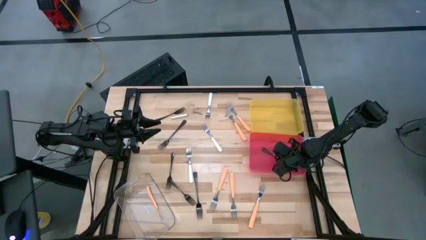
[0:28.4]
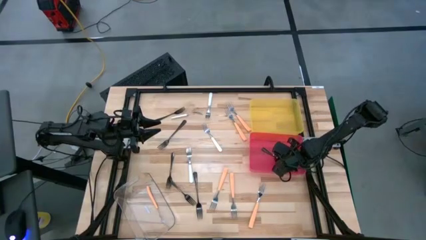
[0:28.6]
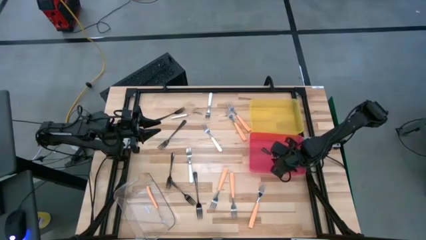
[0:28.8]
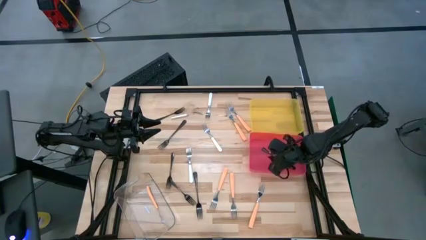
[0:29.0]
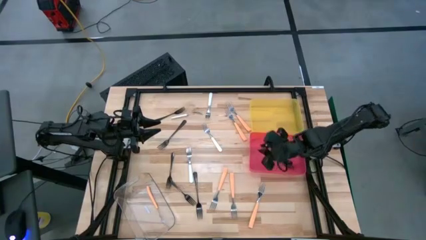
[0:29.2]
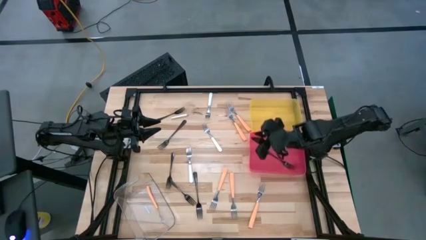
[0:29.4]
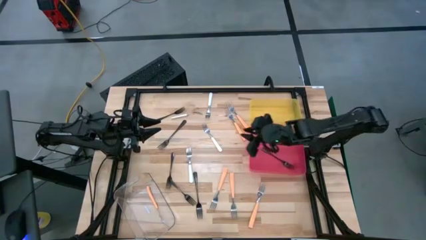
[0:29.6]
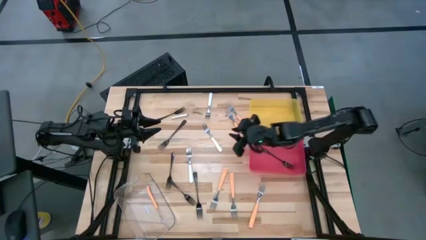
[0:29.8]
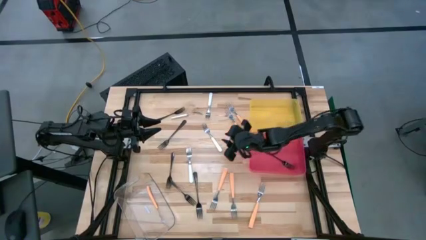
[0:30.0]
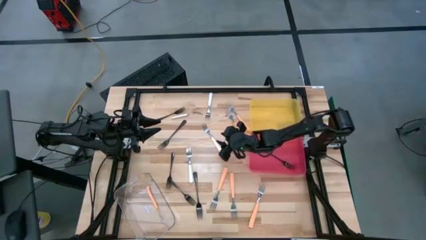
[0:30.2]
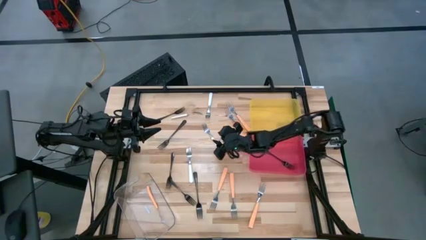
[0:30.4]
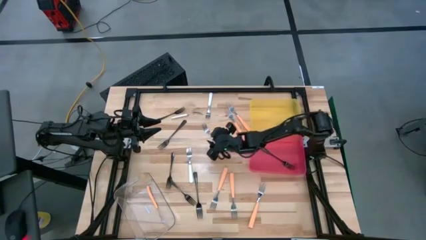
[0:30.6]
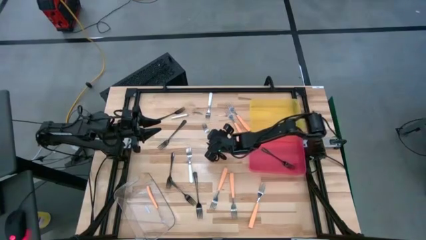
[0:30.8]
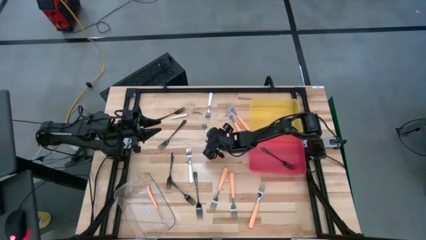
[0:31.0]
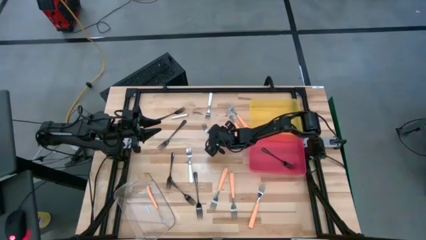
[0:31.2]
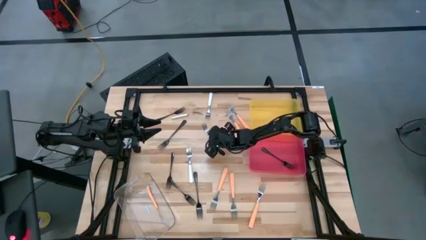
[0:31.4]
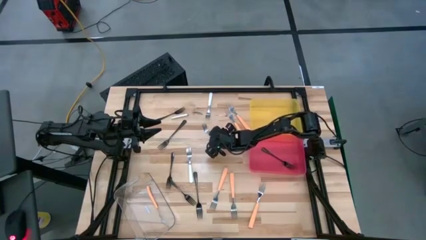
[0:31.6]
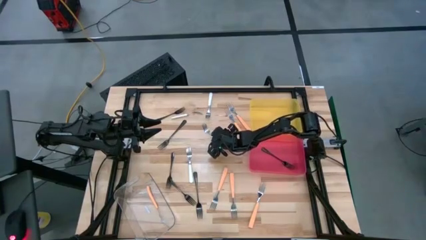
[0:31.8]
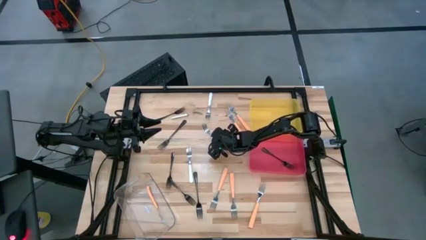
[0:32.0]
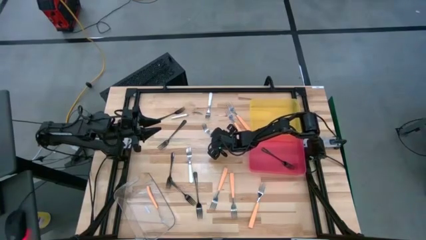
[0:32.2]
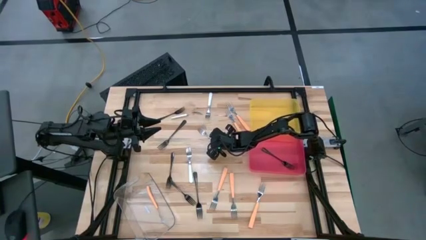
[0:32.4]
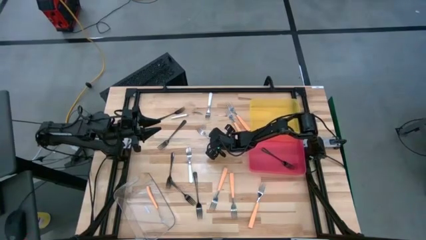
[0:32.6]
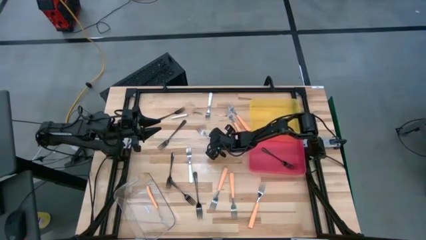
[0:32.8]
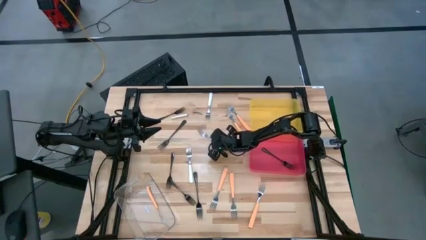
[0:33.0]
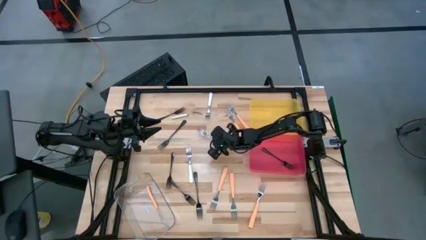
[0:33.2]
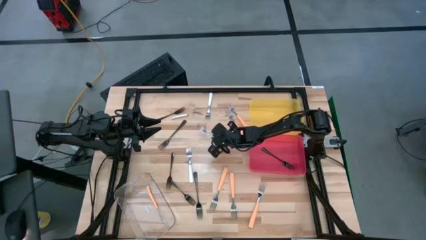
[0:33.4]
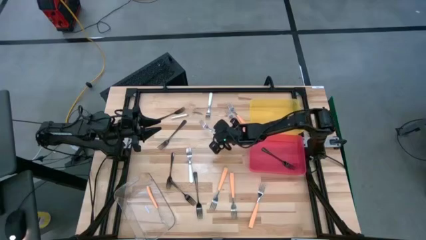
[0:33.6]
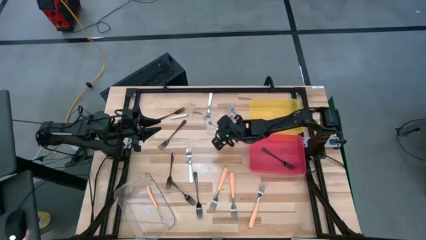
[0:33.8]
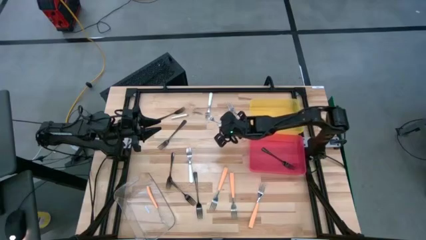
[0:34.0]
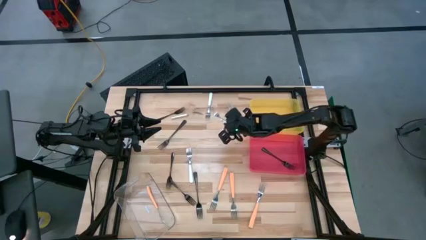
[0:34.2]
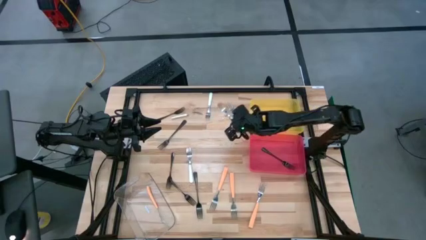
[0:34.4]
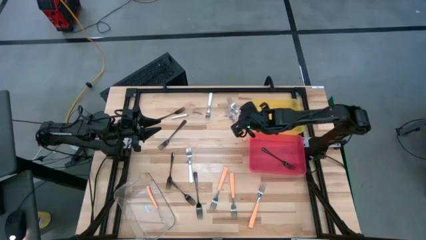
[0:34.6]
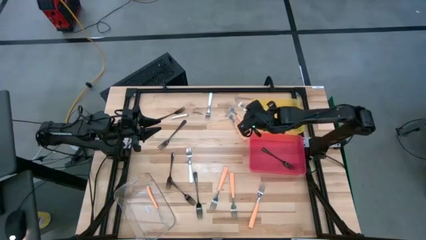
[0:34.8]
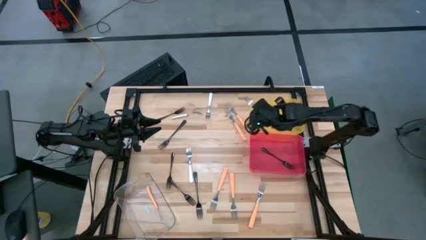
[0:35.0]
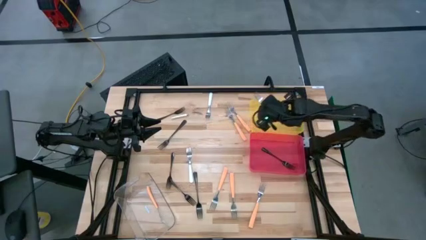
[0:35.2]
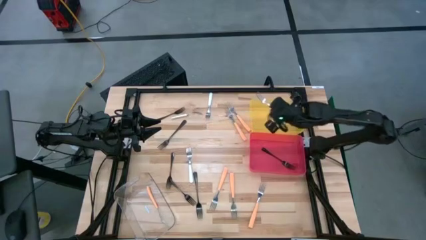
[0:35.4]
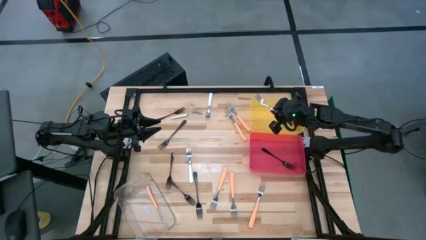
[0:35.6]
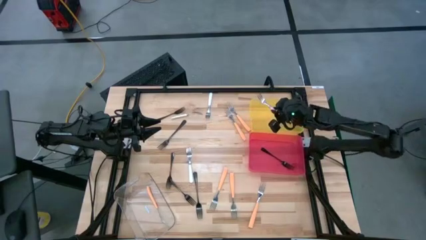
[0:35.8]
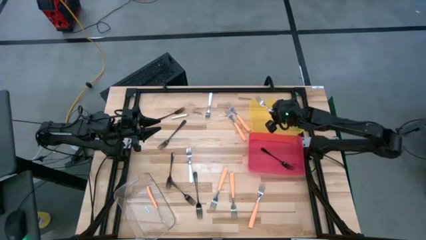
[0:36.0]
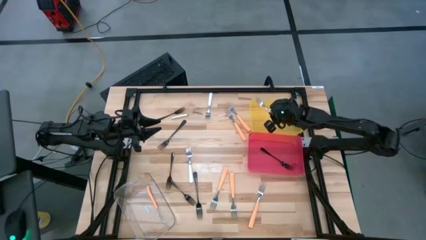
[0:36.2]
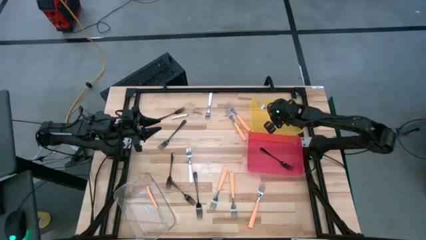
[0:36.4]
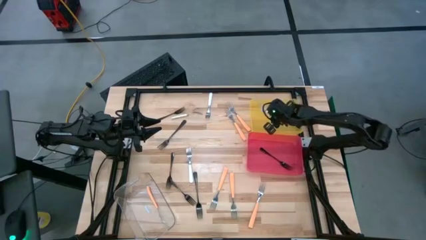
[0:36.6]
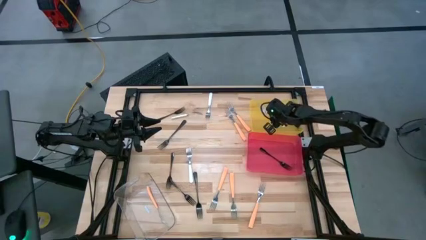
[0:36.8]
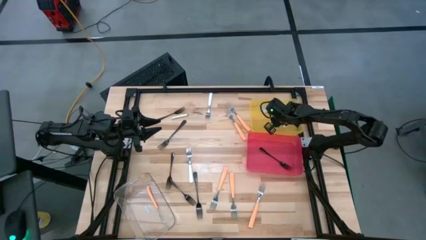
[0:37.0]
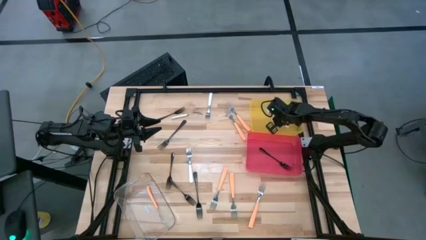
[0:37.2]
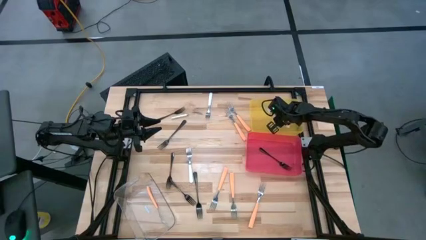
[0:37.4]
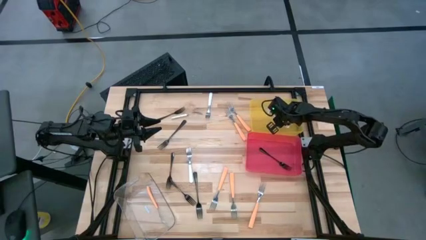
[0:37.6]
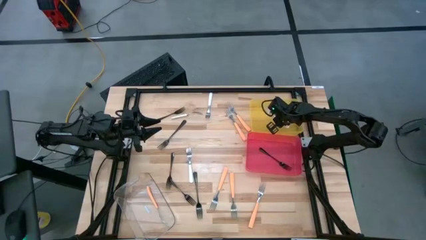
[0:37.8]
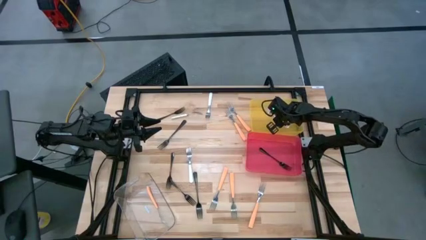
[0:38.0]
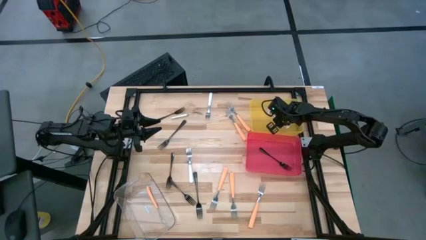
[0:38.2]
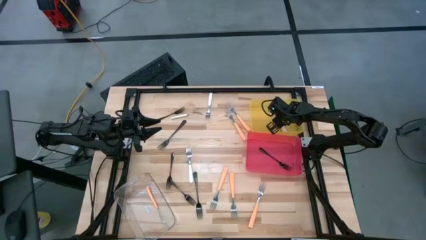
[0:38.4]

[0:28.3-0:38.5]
Task: Sort silverware by color (type)
Put the white fork into the yellow bin
